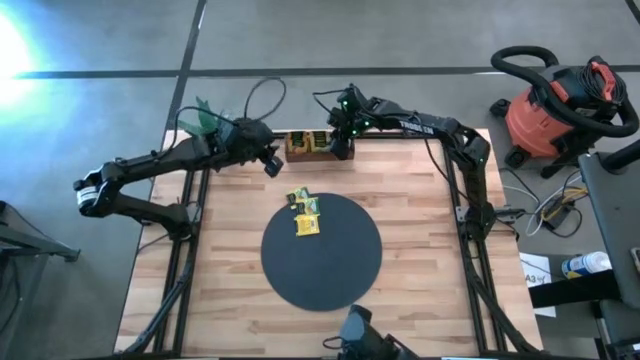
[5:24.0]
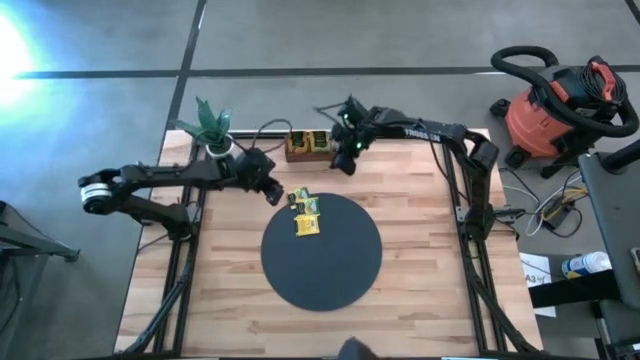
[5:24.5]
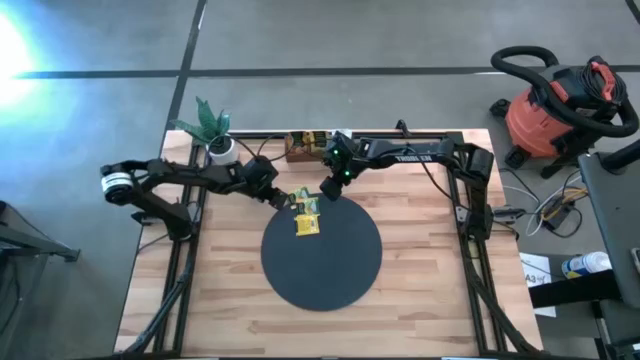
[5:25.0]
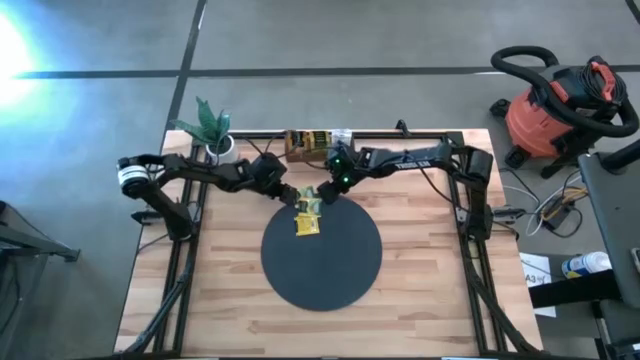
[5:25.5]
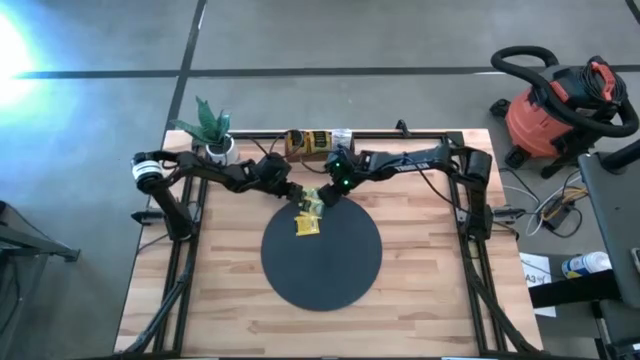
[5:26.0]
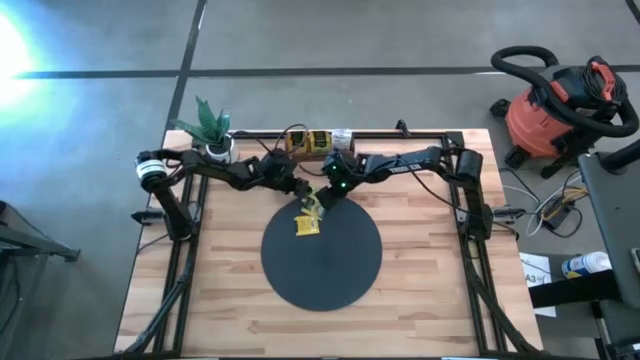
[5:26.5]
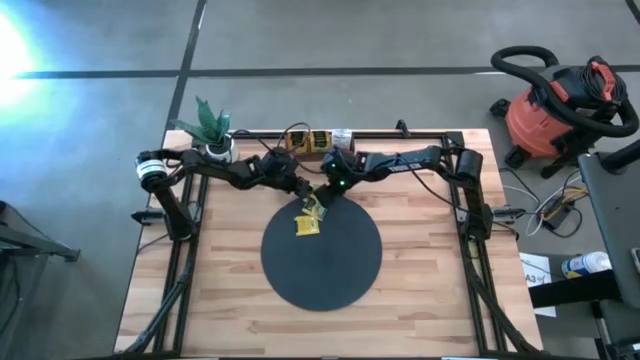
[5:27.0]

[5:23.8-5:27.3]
Task: Pick & Place Tea
Put the yellow tea bag into the middle section of the wooden organizer

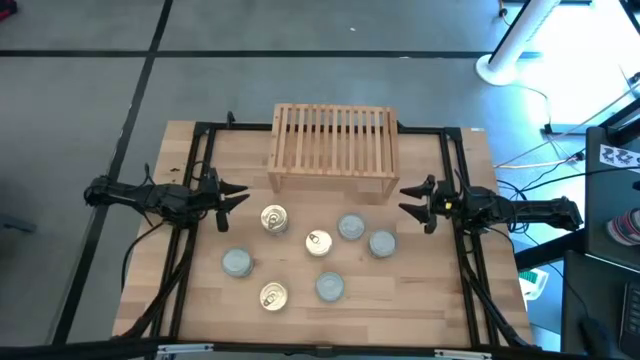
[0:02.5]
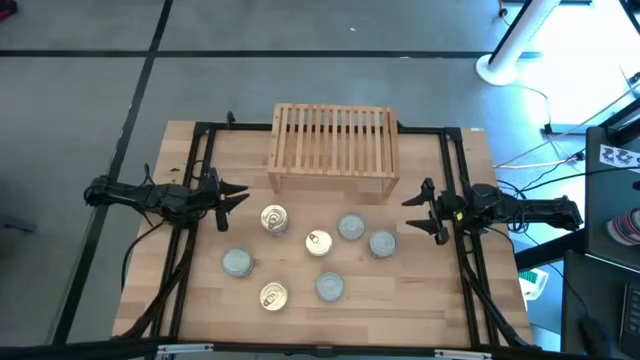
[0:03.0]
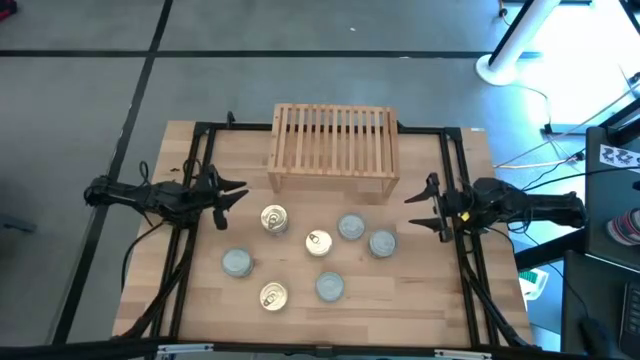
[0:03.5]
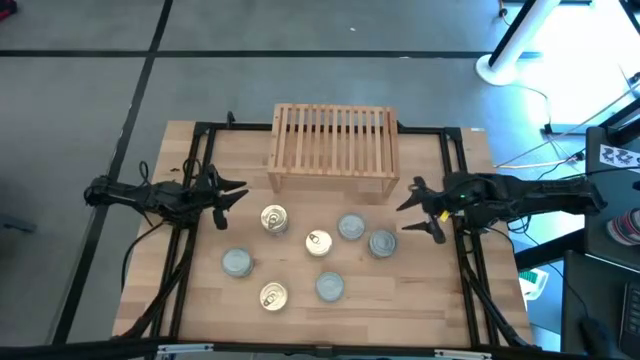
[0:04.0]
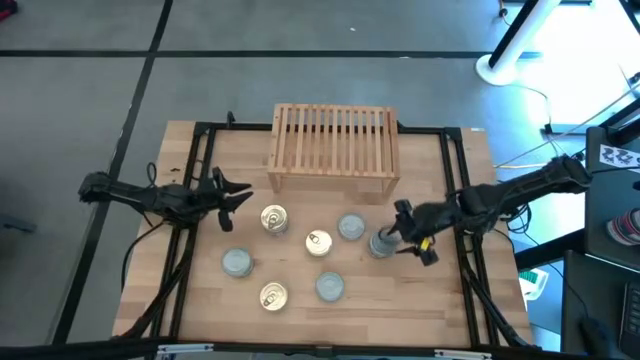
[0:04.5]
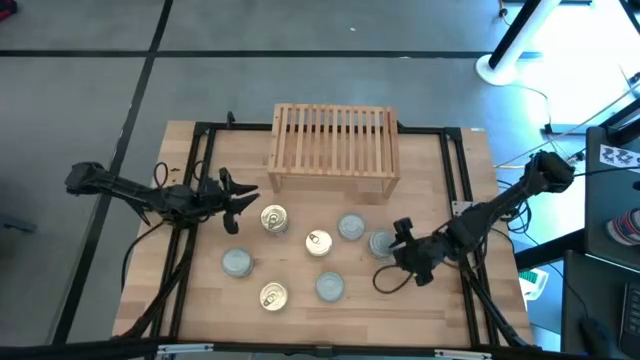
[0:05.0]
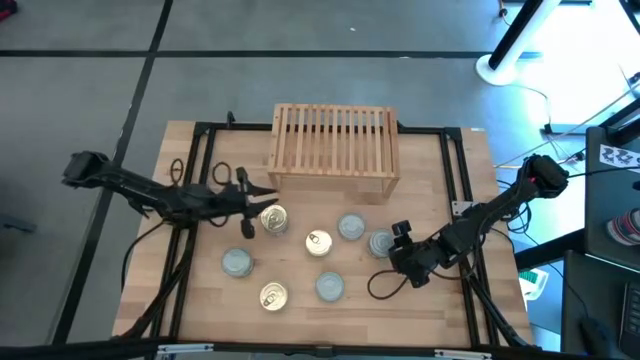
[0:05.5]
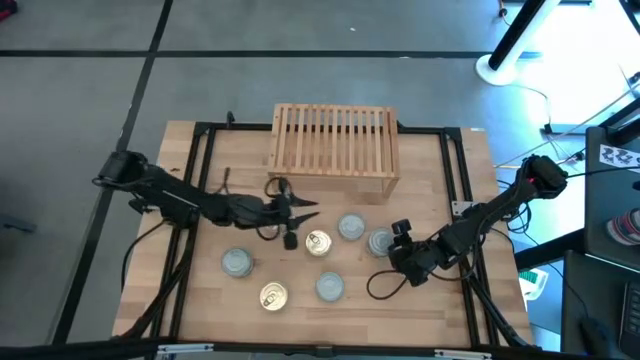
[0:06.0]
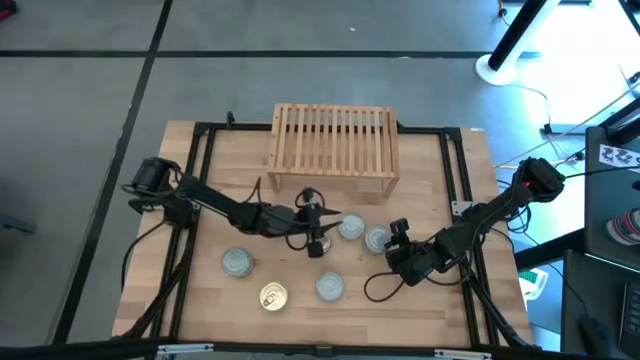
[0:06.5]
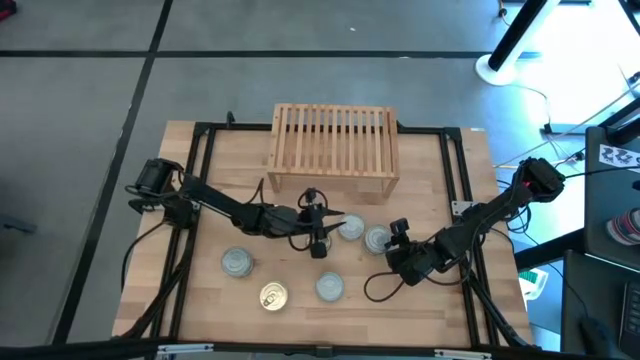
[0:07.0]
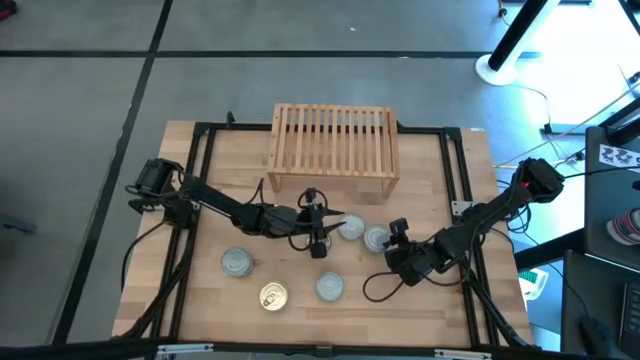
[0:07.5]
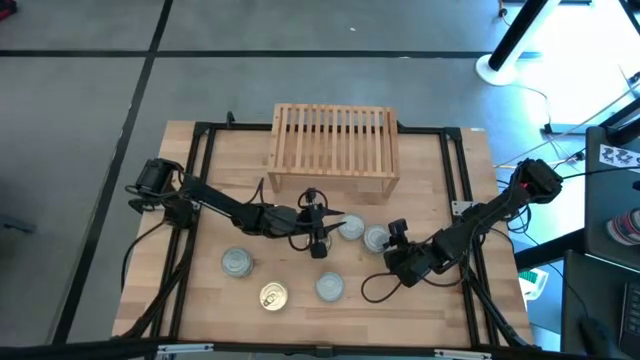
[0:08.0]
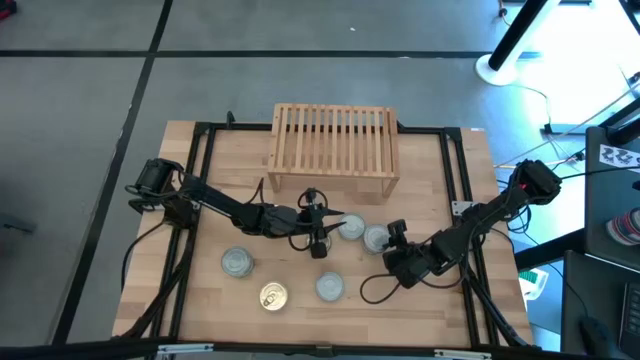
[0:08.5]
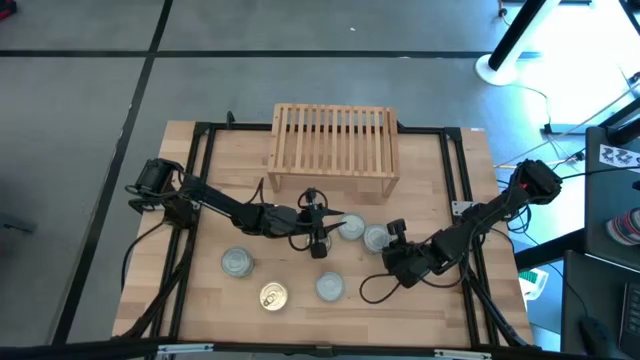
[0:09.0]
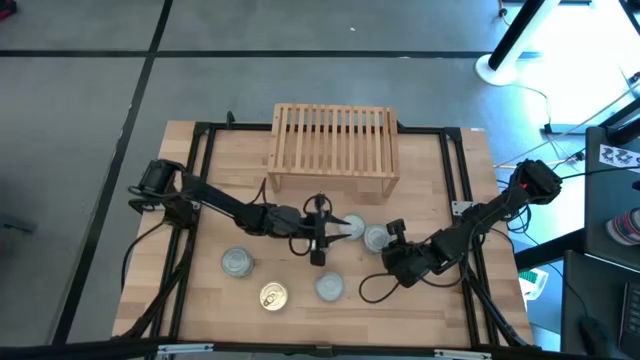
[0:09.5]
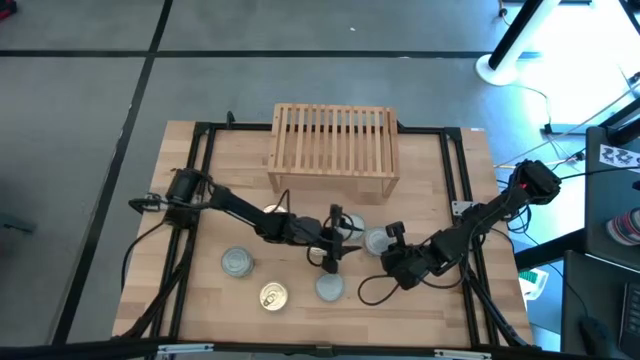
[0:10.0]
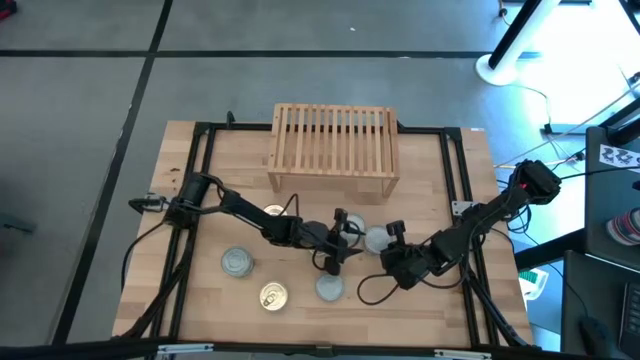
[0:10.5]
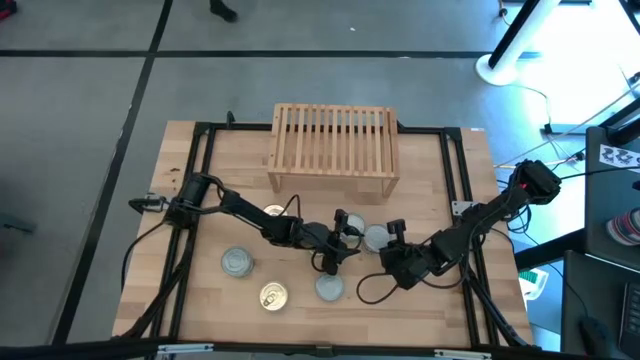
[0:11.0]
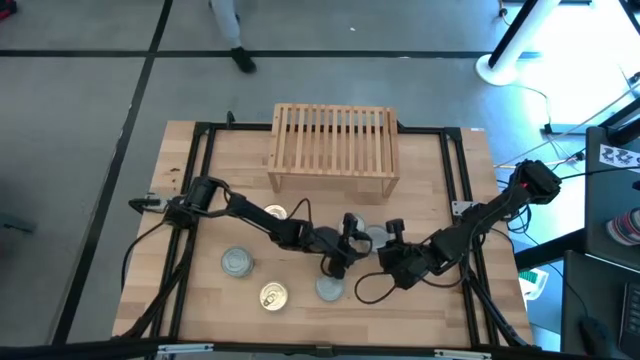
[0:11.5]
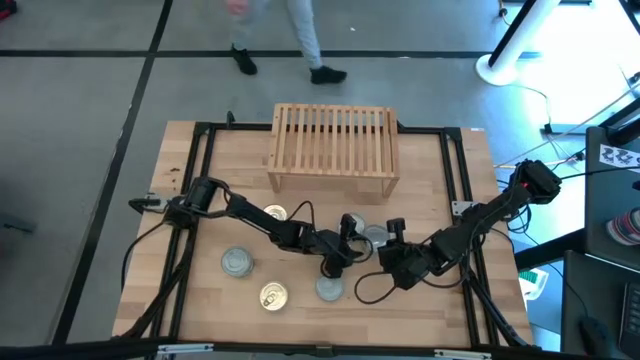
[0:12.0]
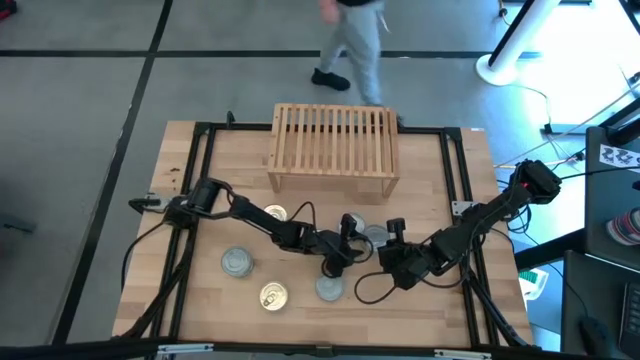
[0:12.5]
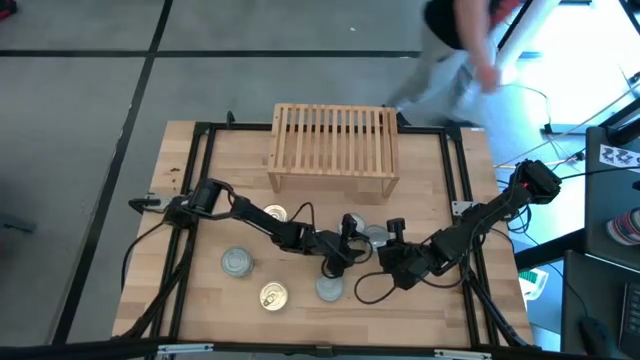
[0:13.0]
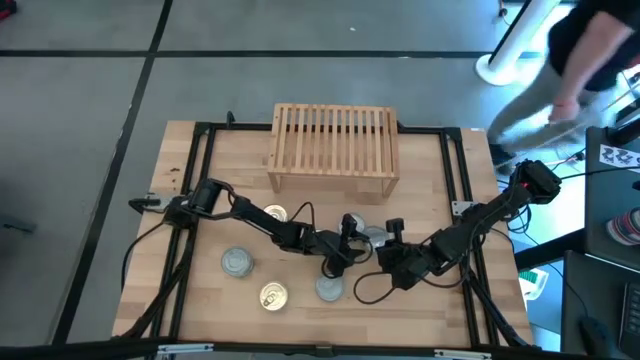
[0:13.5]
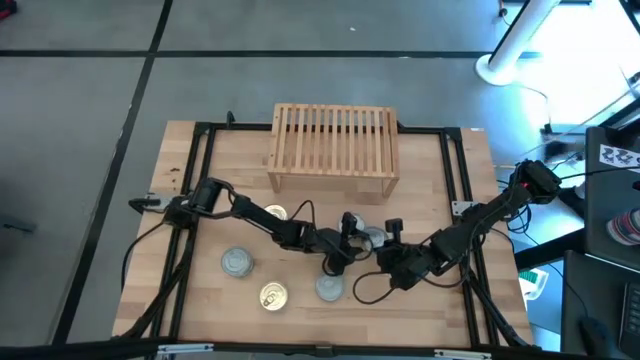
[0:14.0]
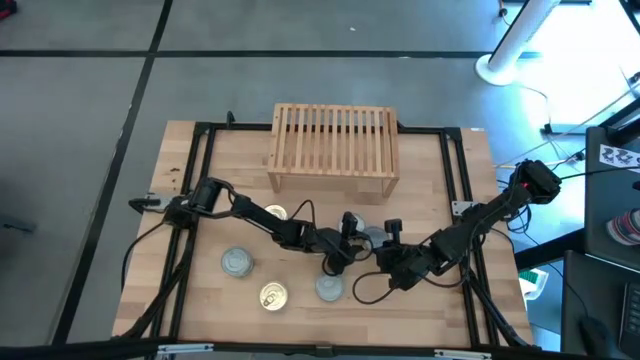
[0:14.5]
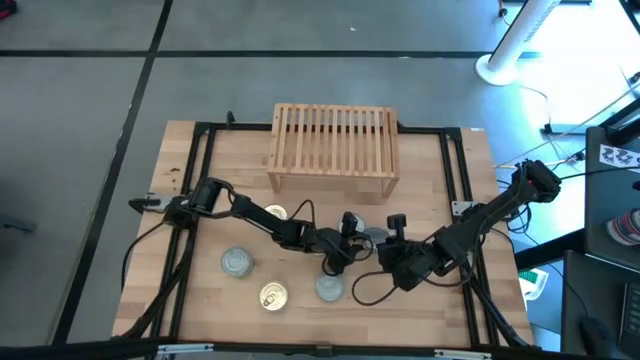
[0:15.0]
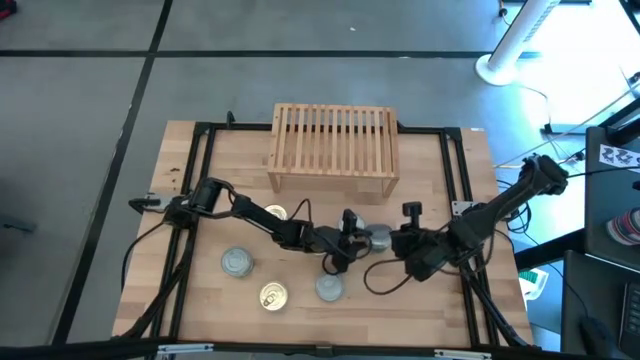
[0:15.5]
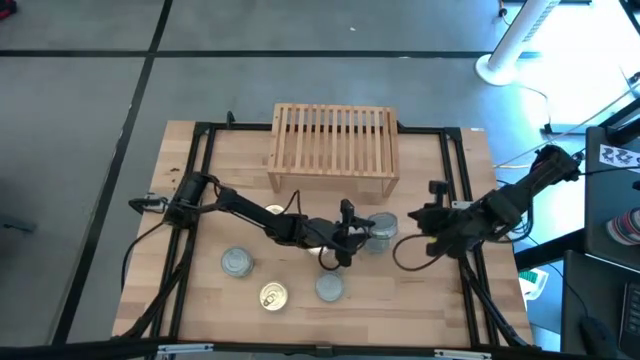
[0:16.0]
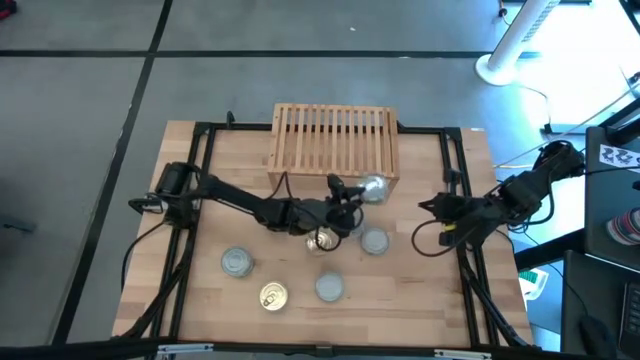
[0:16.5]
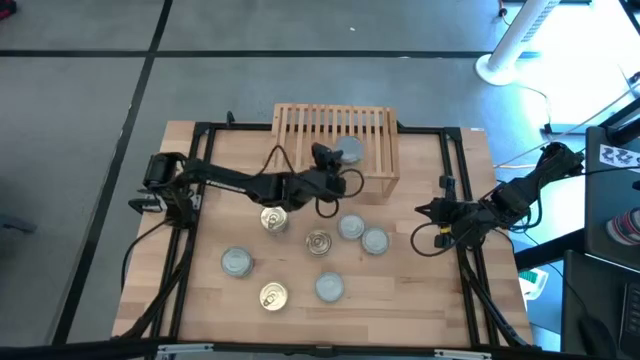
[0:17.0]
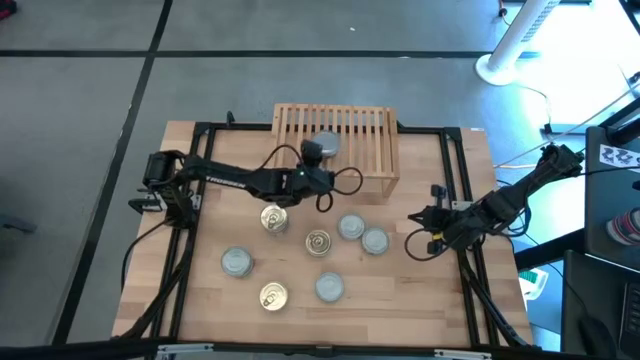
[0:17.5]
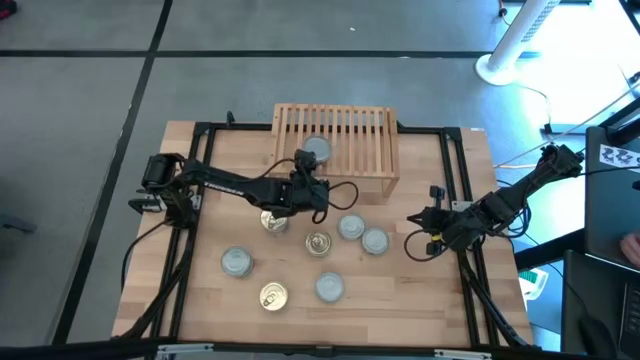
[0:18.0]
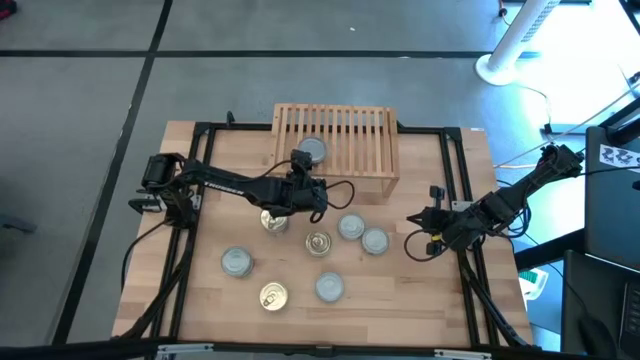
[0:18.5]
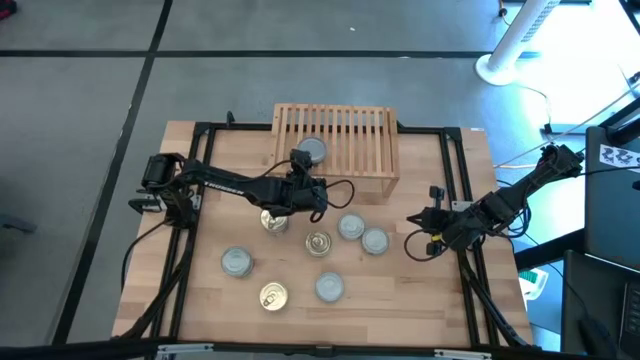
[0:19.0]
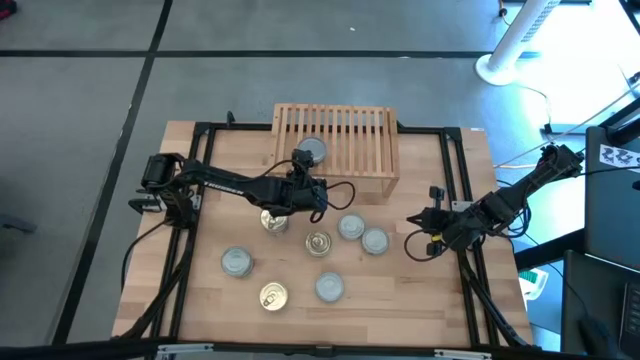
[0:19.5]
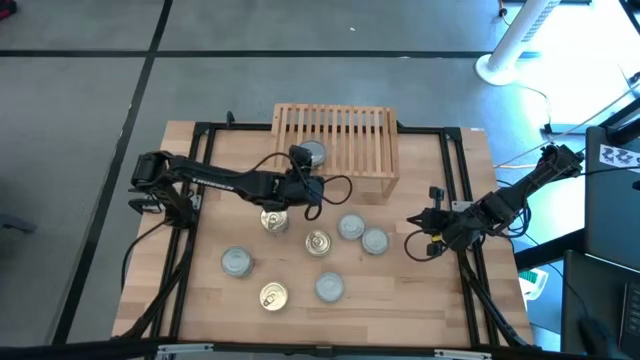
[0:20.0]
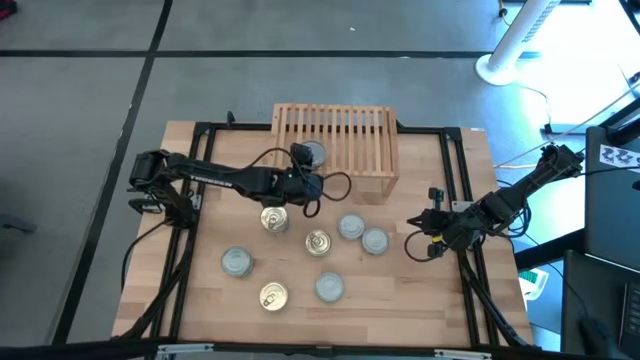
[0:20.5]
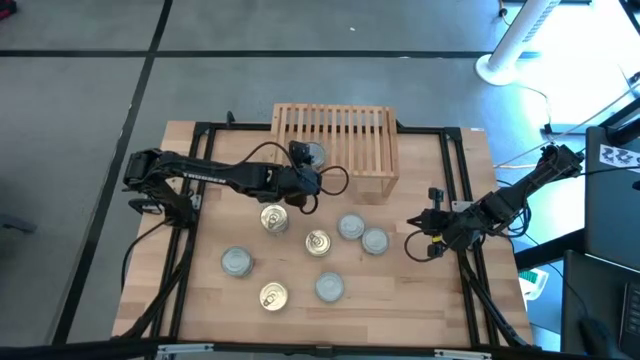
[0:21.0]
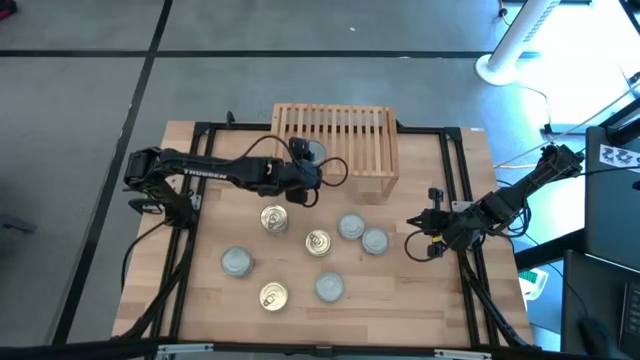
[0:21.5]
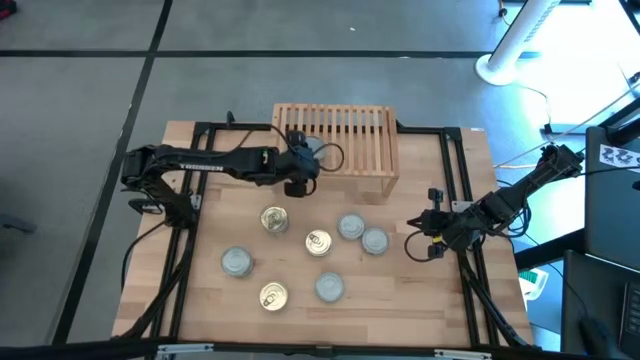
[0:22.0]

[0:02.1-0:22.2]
Task: Stack canned seafood by type on shelf
Put the green white tuna can on the shelf
